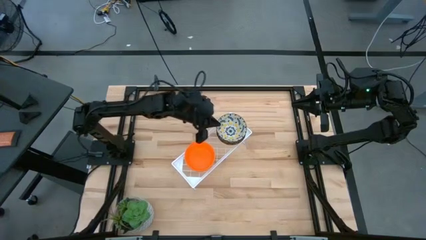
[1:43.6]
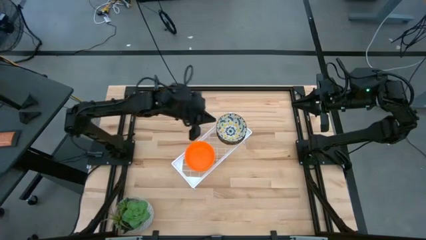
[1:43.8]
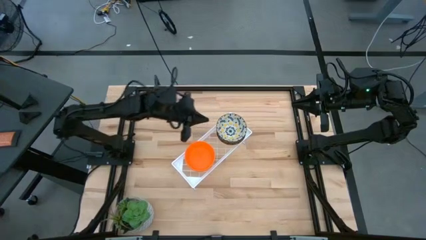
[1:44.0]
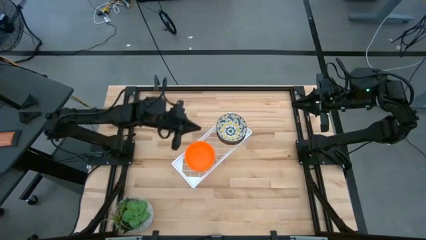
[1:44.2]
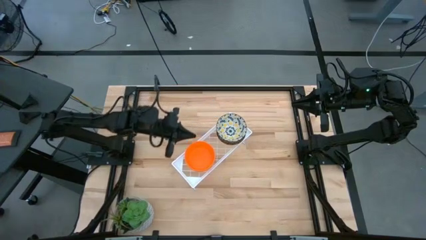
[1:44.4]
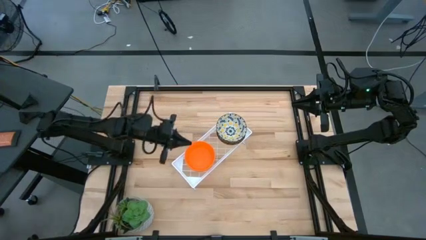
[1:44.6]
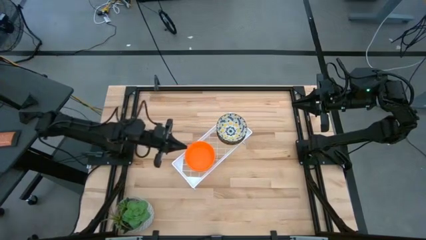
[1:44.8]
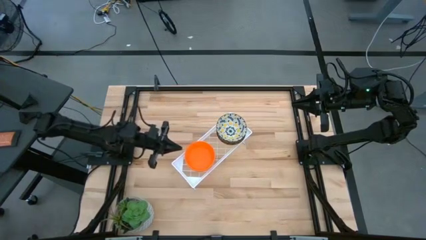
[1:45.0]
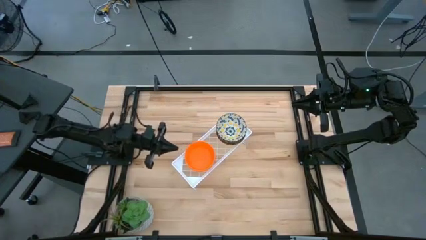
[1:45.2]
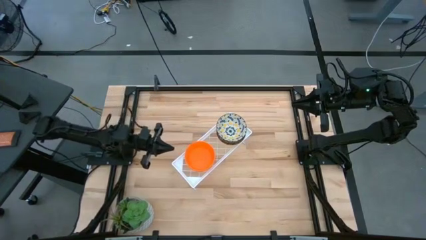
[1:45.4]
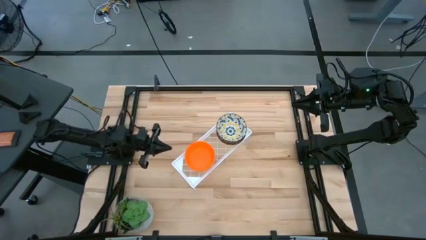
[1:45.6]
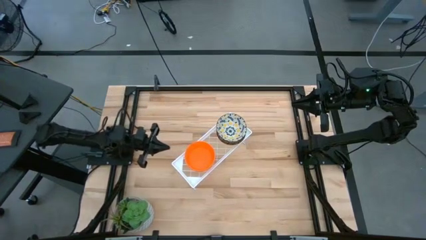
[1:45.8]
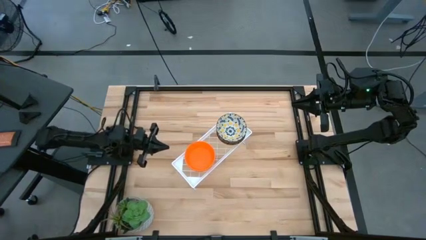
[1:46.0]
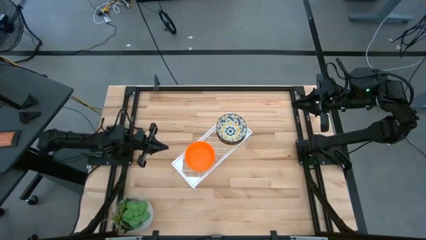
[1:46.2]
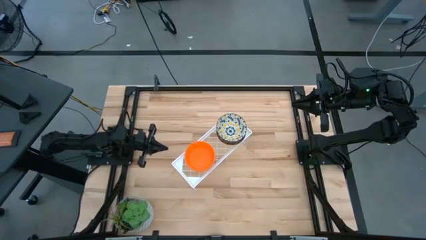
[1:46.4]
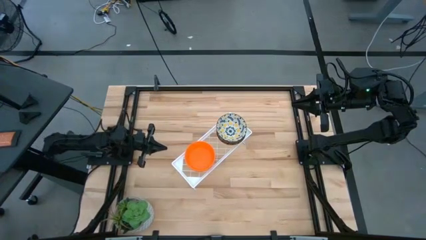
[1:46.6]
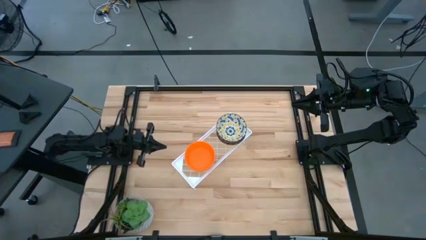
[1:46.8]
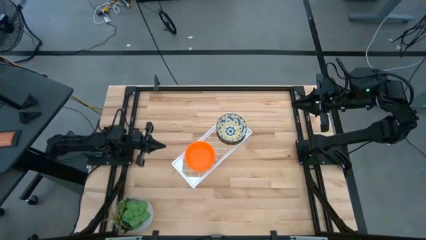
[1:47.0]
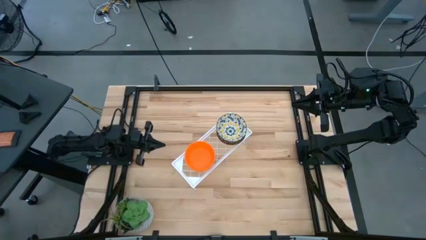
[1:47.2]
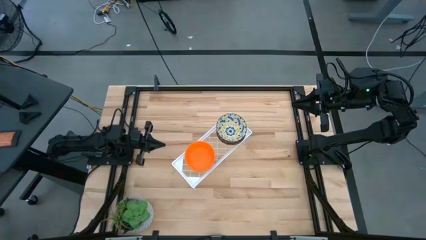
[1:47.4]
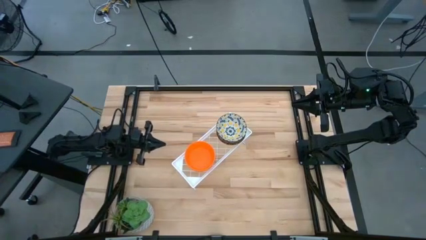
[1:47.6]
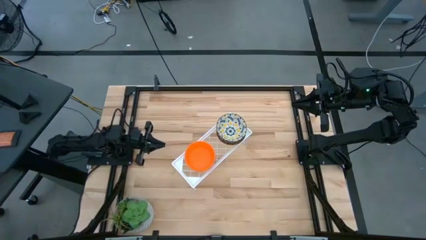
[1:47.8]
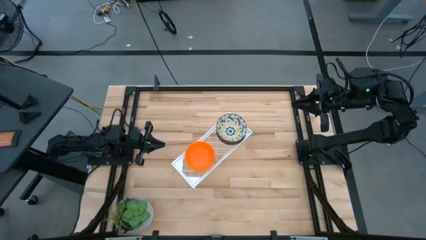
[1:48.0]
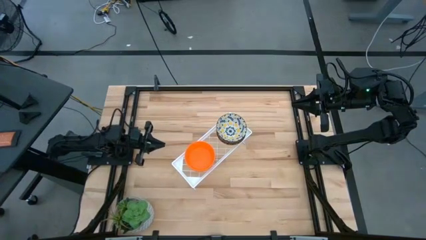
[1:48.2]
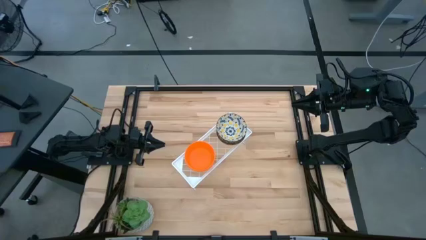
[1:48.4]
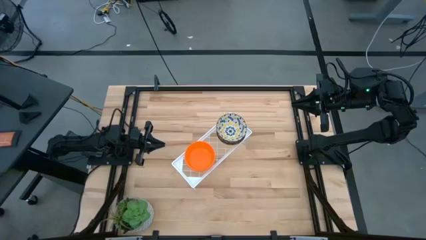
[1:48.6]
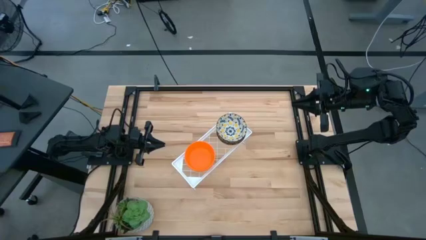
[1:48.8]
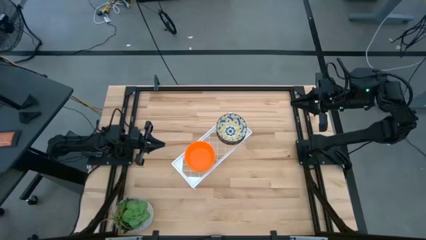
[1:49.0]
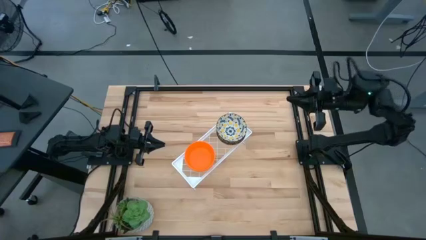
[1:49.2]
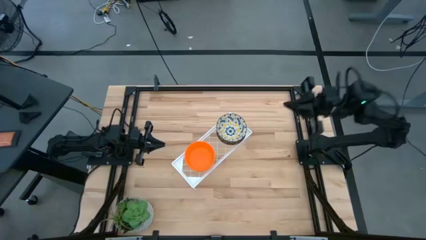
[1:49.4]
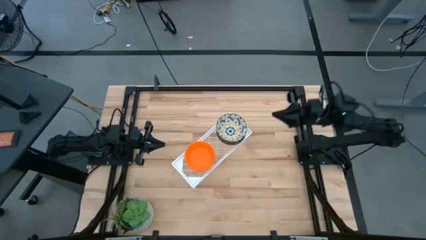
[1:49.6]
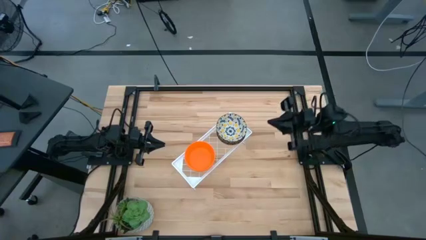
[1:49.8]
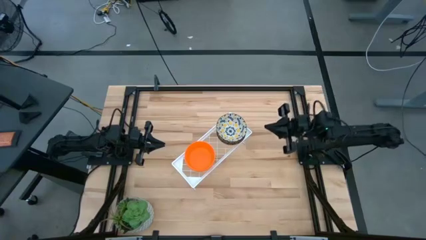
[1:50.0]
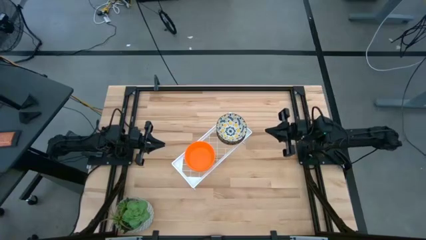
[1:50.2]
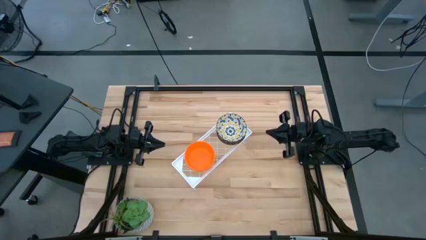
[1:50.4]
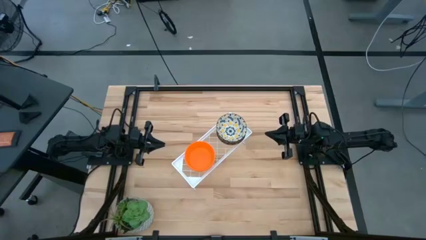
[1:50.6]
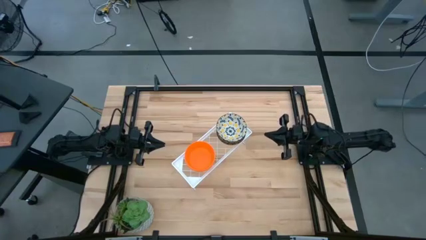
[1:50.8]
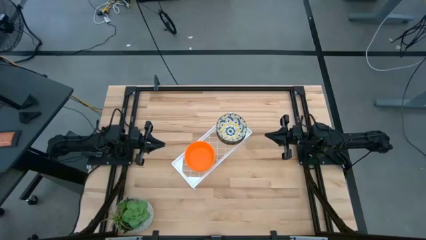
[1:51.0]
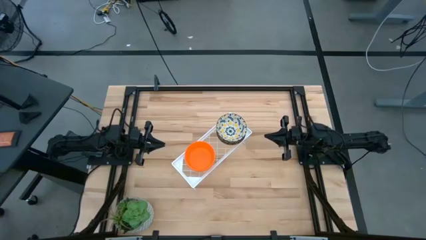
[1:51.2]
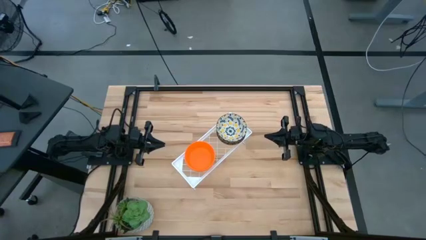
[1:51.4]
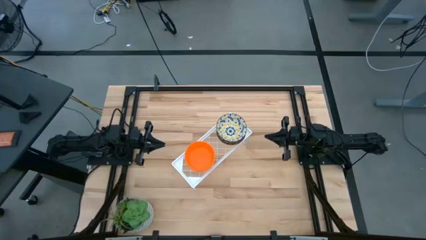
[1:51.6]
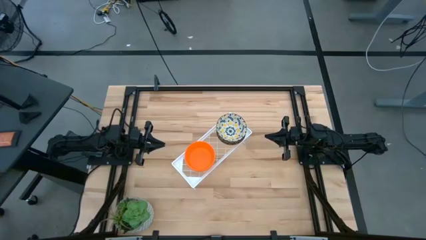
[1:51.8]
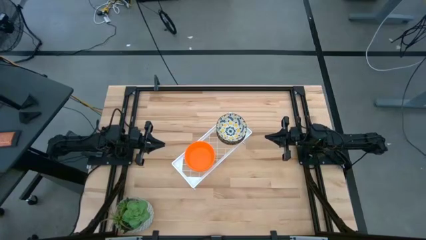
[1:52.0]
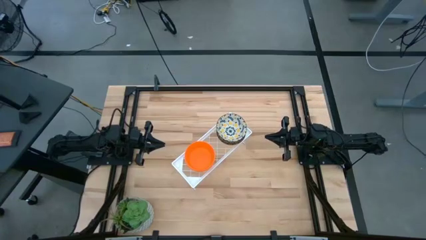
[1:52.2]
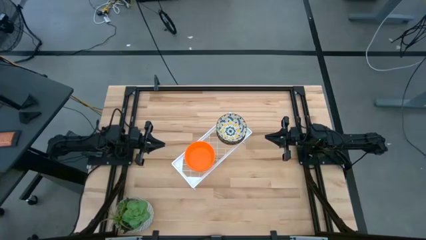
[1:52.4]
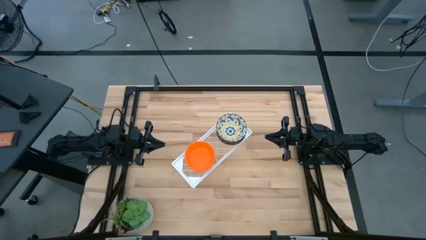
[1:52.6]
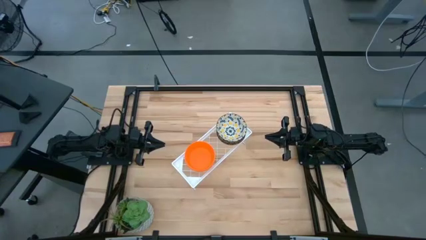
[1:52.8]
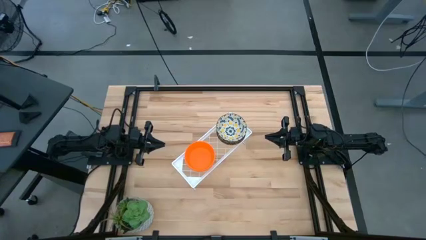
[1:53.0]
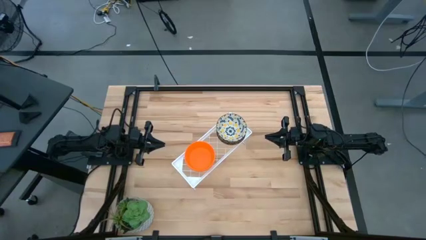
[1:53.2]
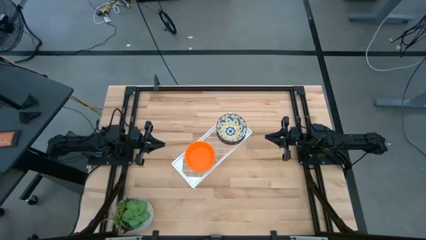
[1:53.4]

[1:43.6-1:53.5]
Task: Pick & Place Mini bowls
Return to Home Position

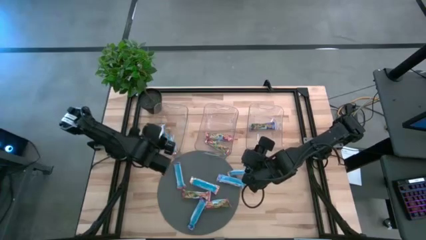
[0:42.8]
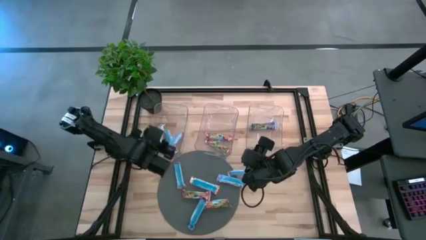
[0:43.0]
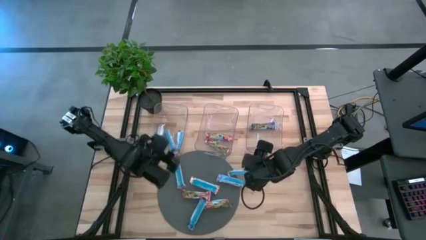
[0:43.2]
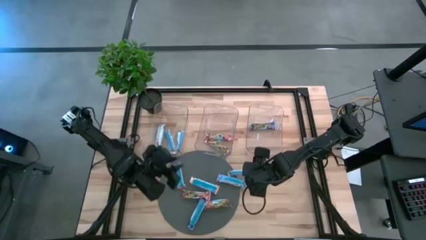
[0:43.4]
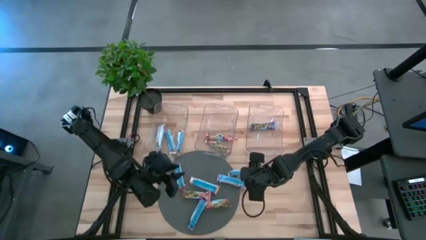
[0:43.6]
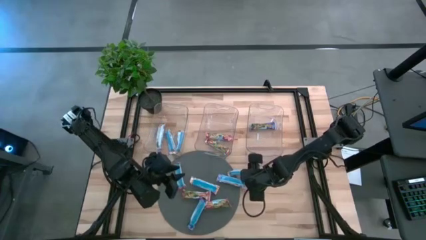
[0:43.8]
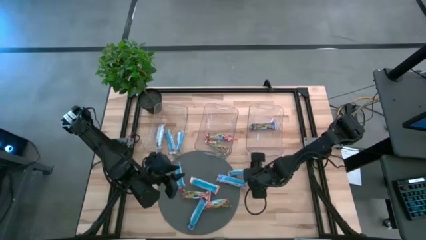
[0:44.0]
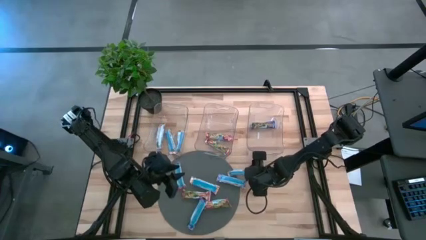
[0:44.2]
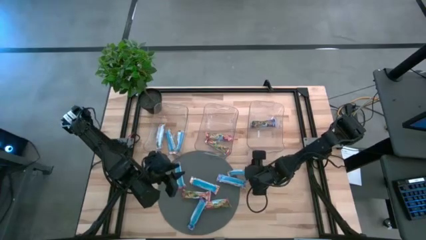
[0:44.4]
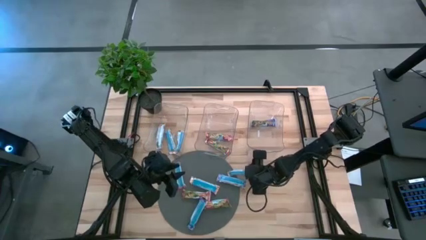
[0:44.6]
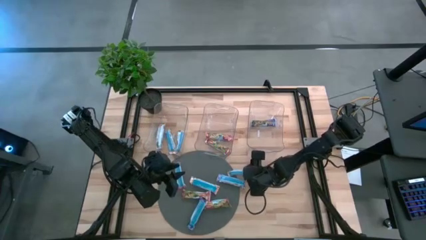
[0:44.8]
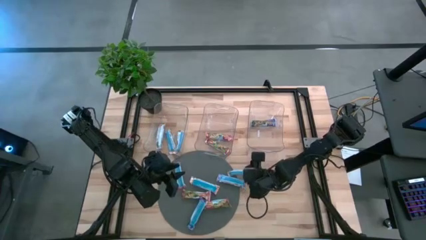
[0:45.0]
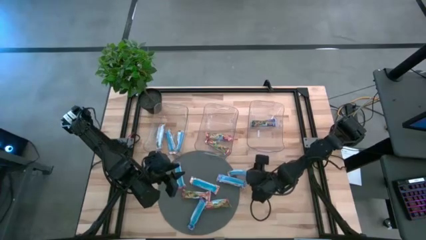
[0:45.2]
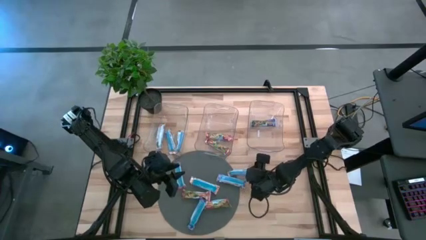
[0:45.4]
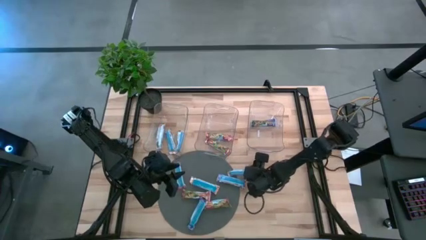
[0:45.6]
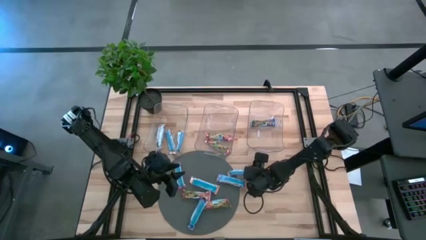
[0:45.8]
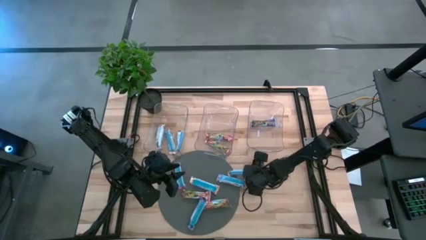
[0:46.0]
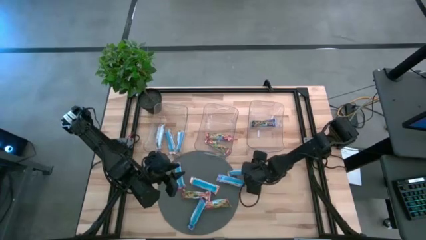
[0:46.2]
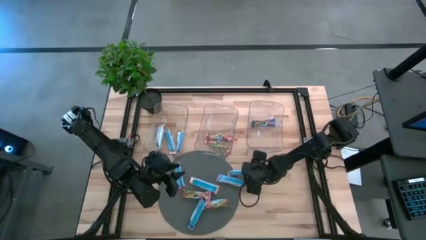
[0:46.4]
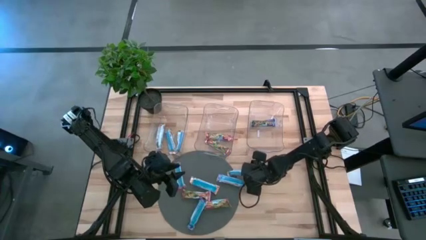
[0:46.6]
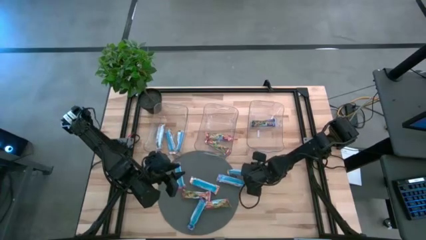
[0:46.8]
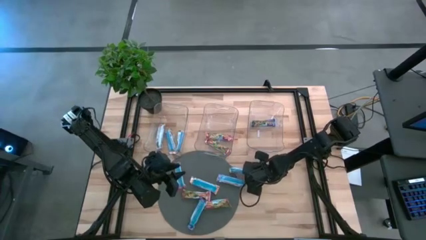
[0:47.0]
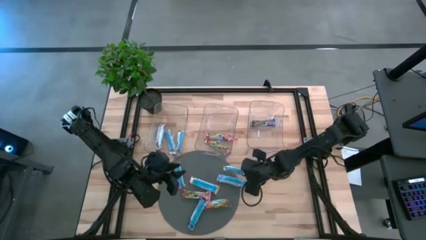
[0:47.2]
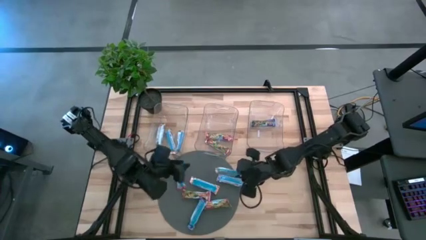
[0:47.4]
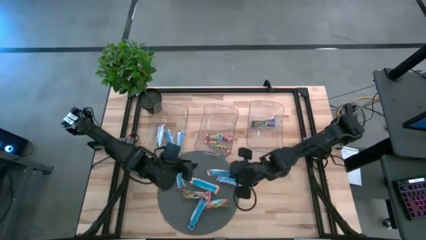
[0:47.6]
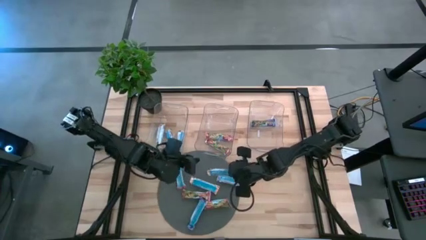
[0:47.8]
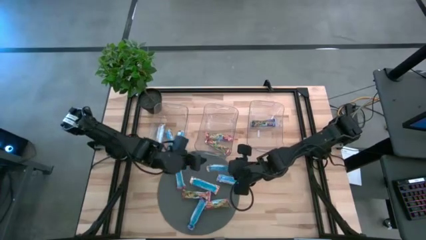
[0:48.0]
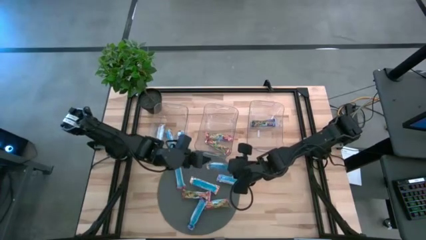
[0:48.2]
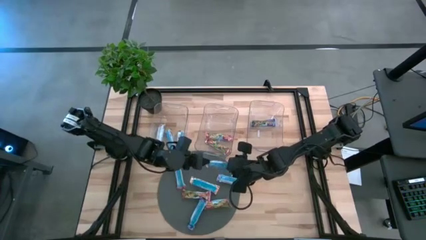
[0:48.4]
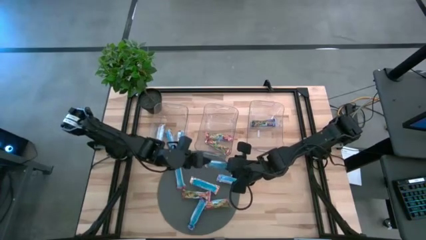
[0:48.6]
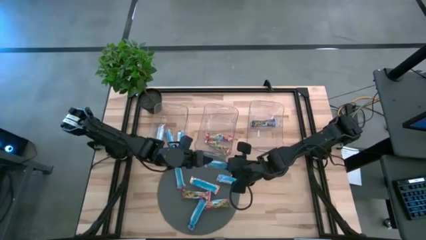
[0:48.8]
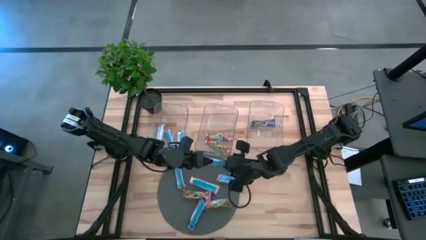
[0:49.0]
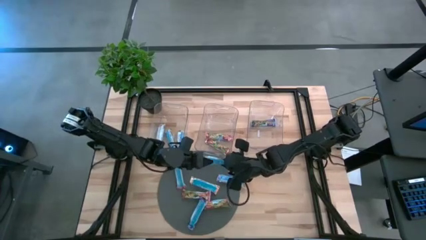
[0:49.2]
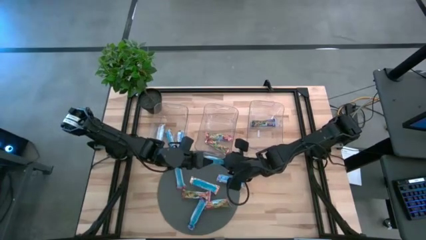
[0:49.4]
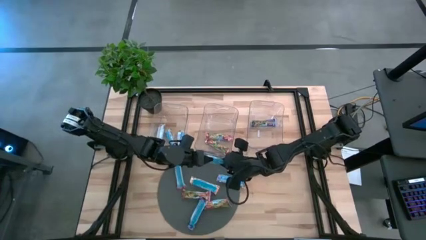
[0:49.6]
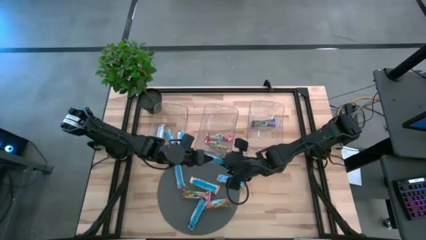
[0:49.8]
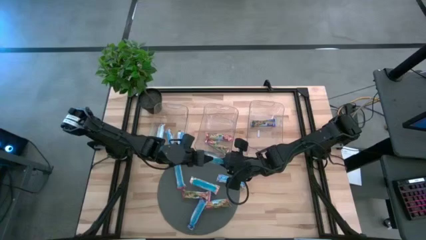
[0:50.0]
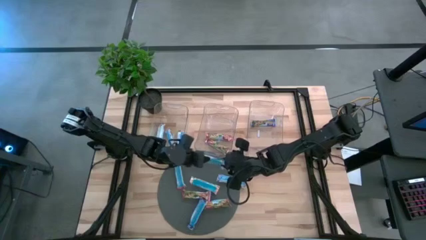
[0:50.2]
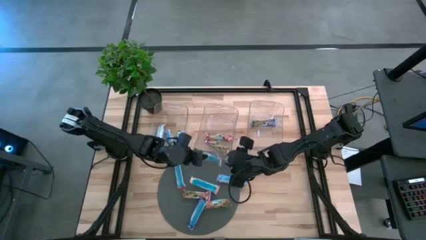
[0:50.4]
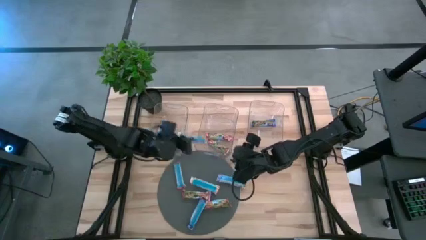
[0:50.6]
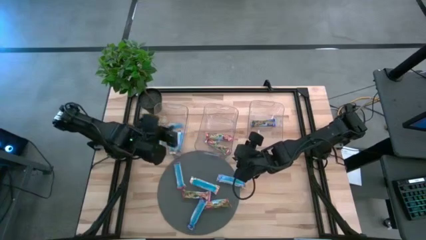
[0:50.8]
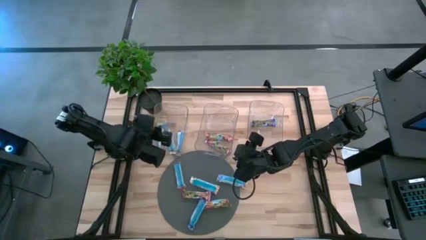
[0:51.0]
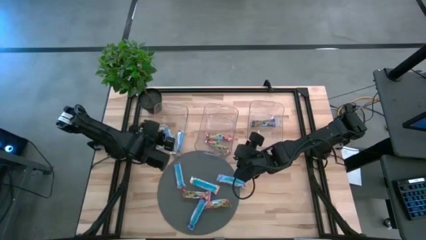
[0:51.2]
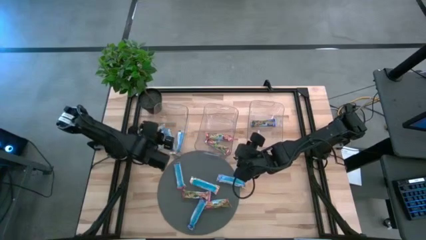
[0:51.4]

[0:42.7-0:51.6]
Task: Pick and place Granola Bars by type
Put the yellow granola bar into the left transparent bin
